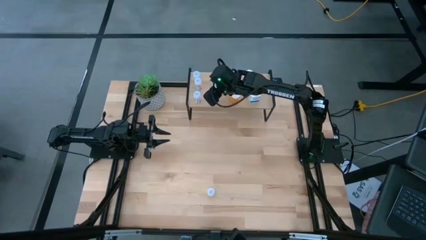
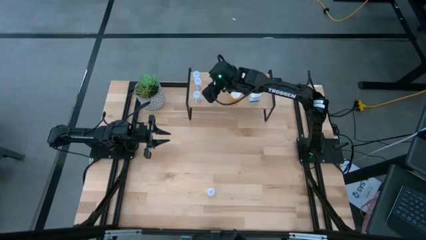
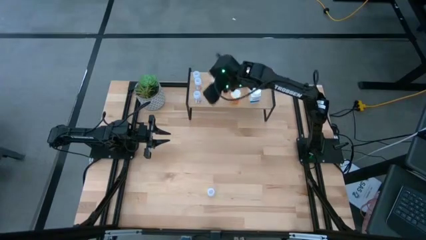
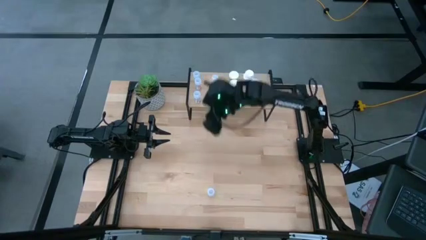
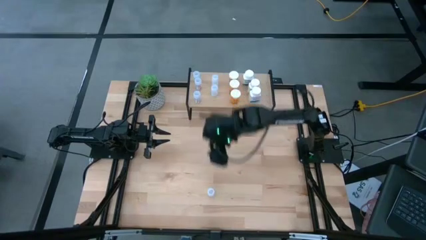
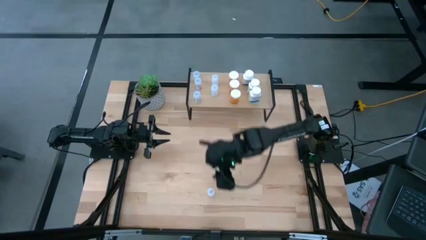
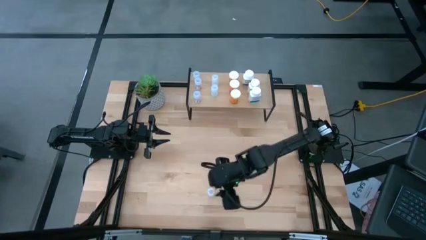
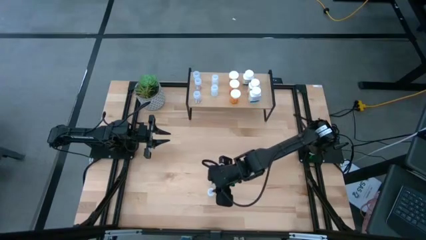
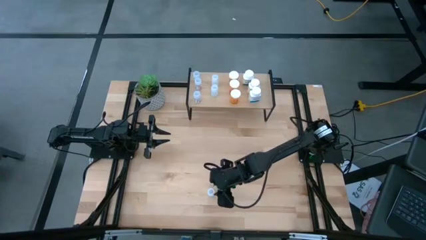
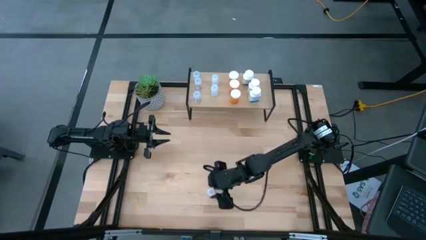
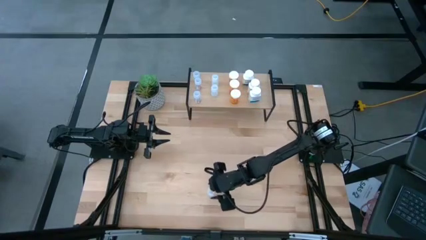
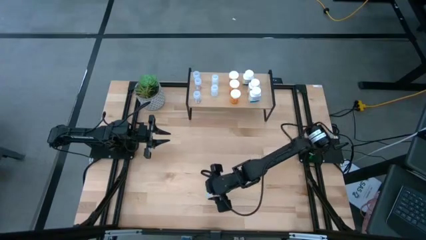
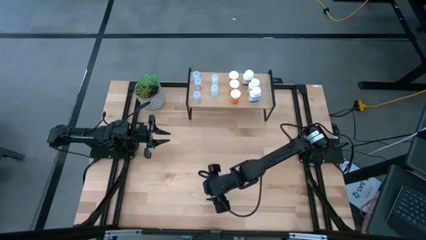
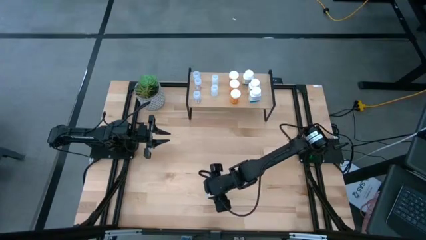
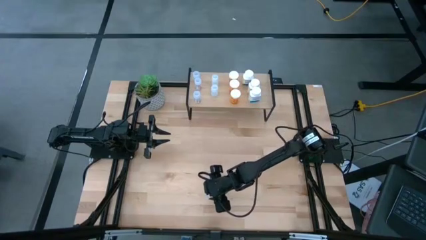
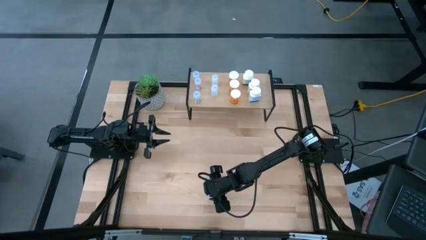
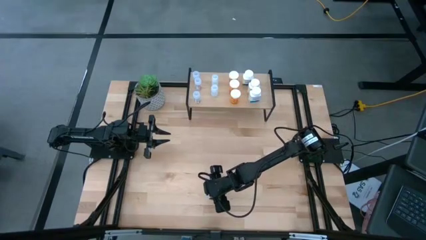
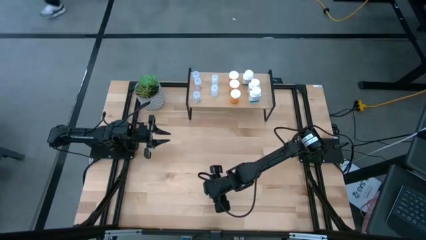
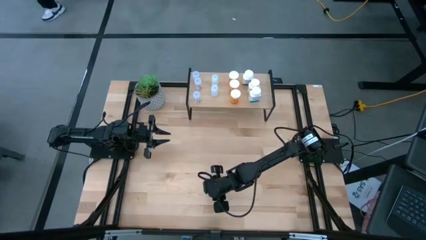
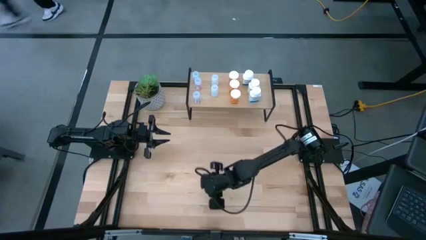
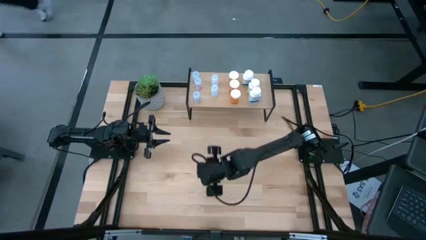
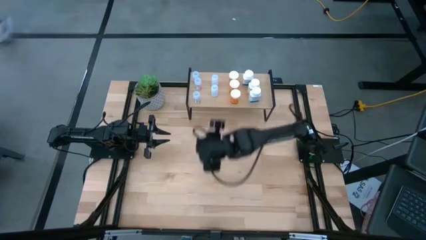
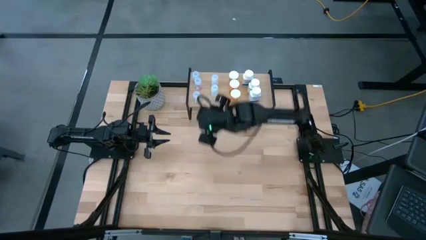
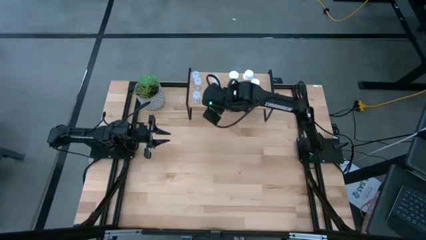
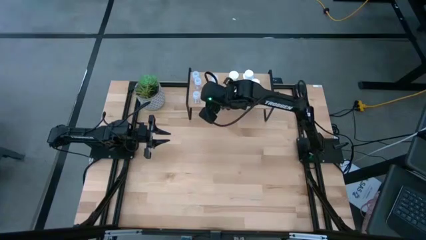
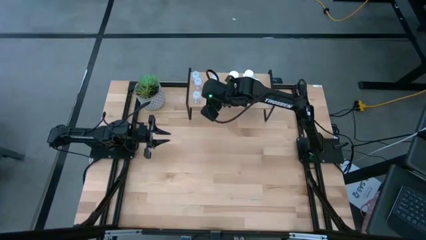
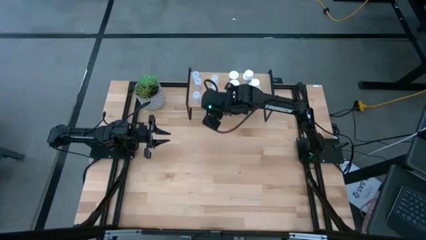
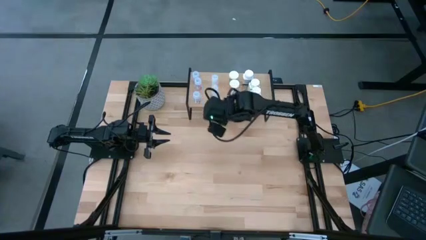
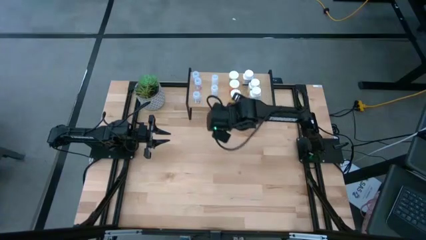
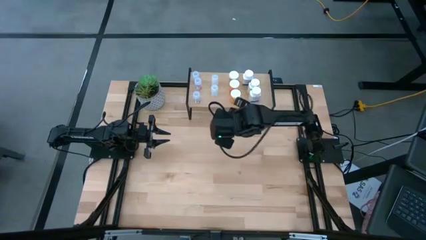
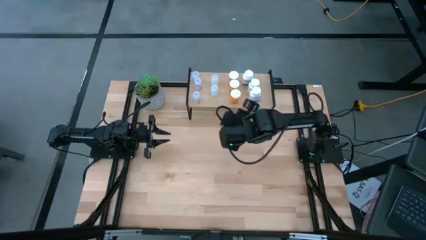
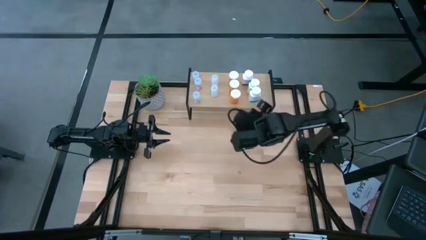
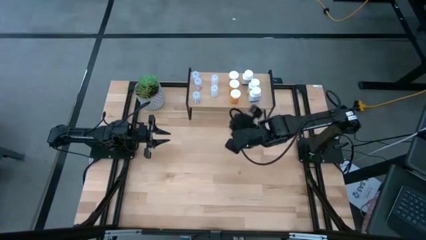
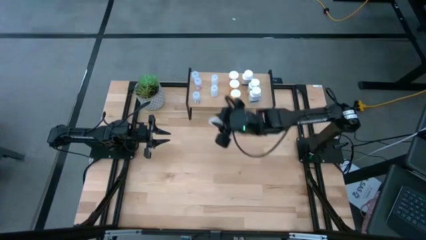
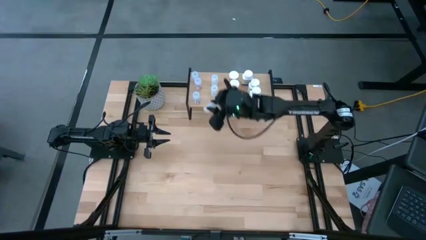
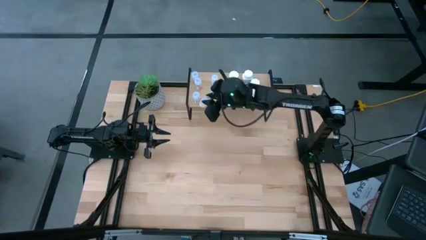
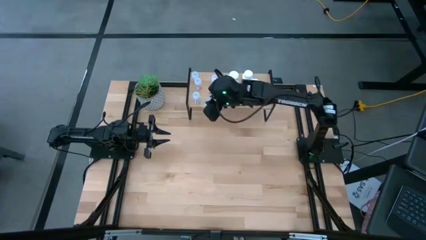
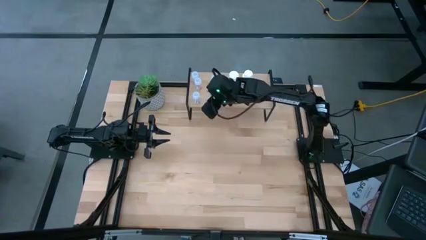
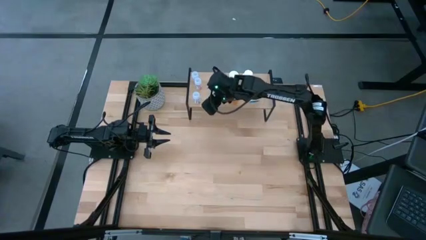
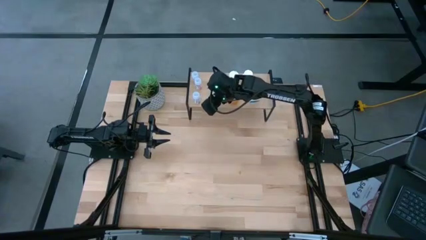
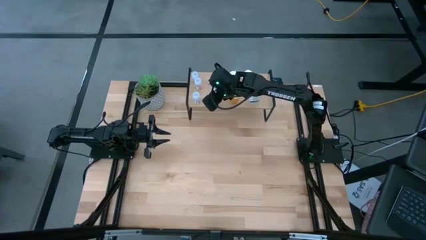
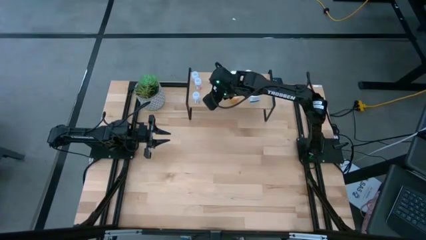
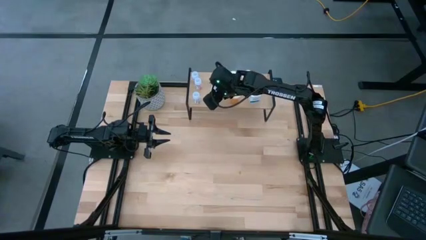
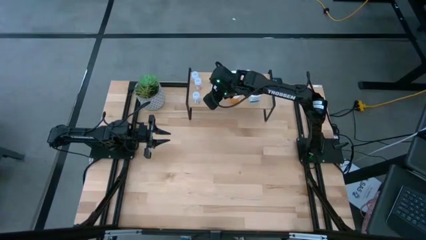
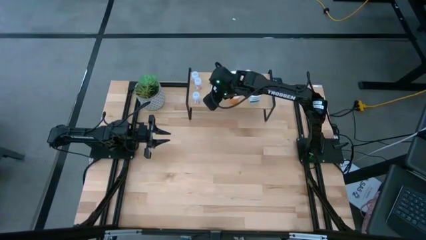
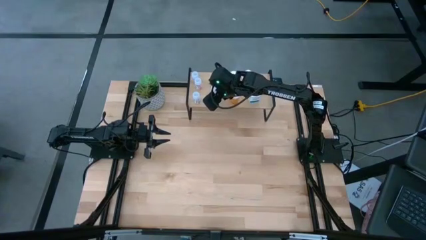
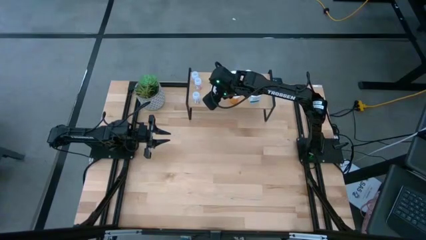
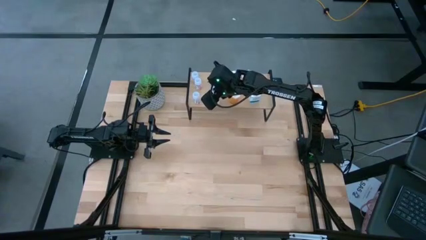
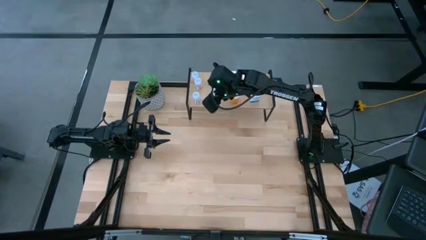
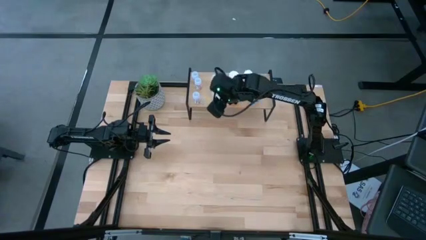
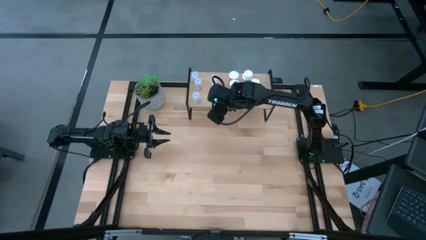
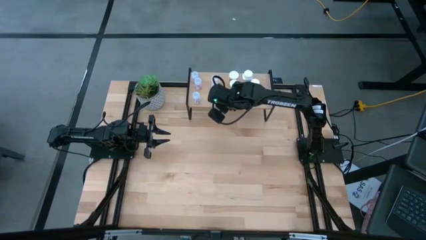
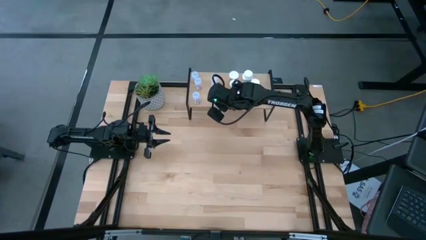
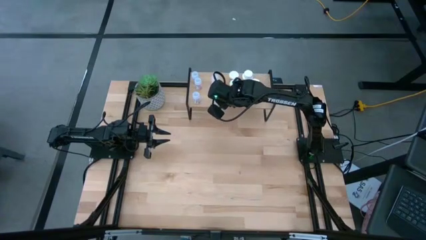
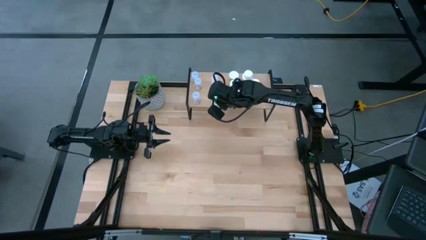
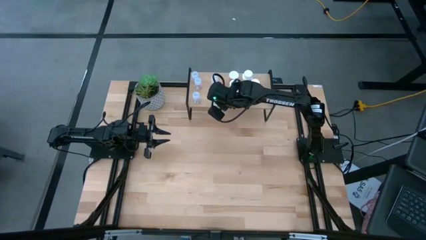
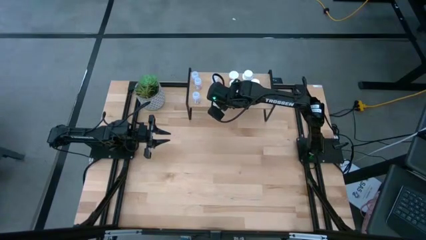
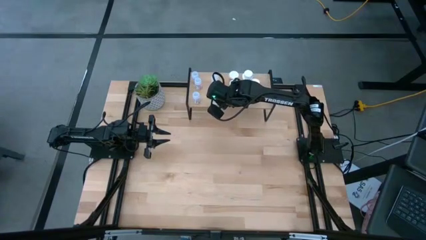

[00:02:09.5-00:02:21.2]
Task: Pick and place medicine bottles onto shelf by color
Put the white pill bottle on the shelf aligned with the other white pill bottles
